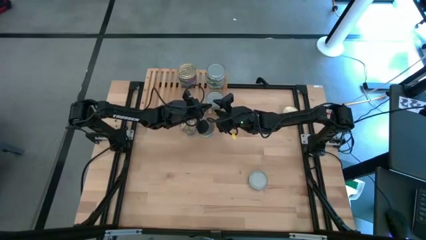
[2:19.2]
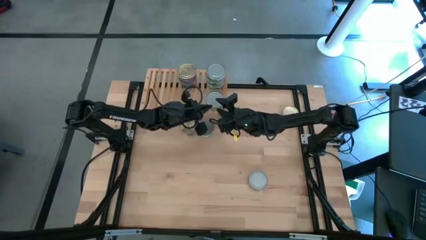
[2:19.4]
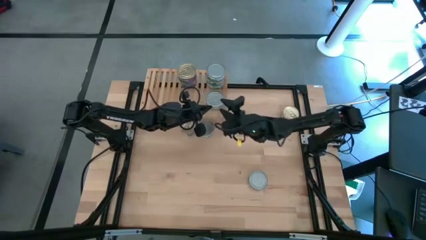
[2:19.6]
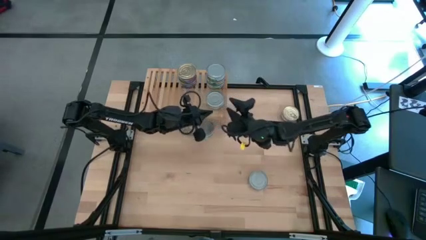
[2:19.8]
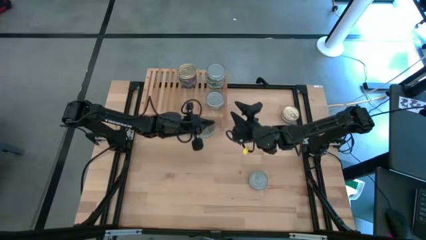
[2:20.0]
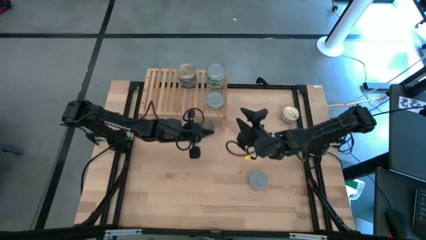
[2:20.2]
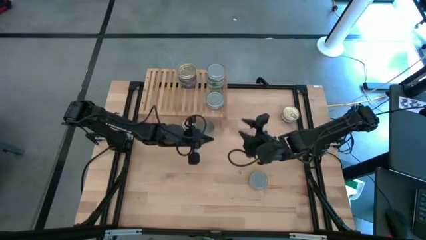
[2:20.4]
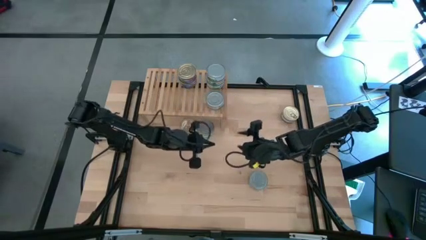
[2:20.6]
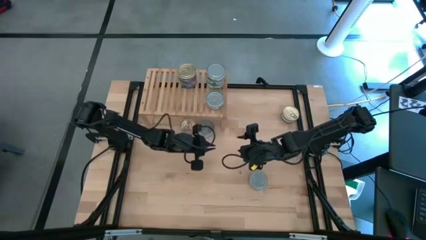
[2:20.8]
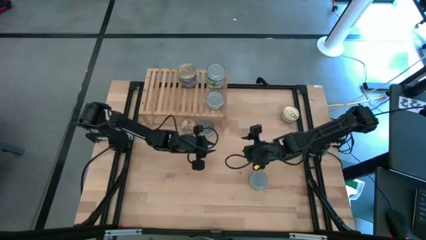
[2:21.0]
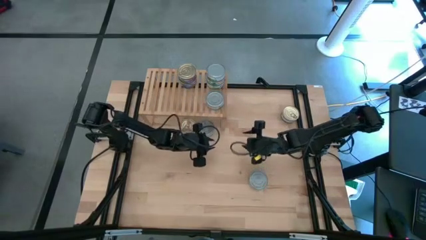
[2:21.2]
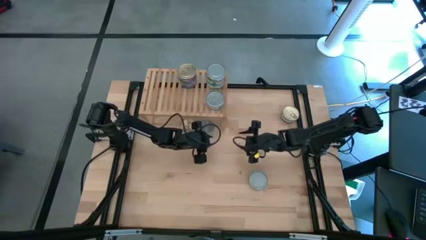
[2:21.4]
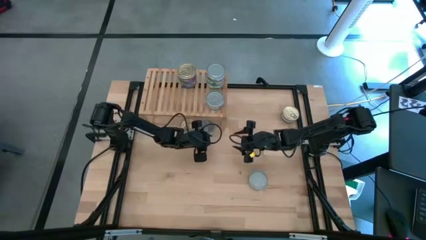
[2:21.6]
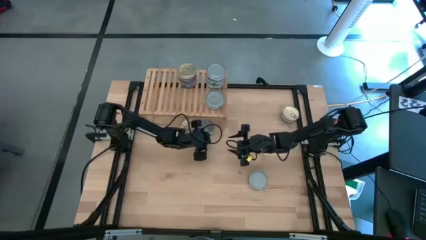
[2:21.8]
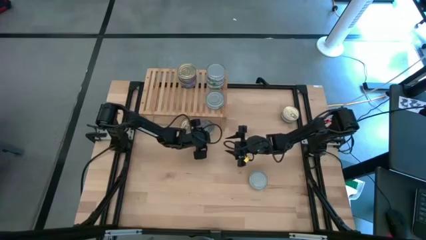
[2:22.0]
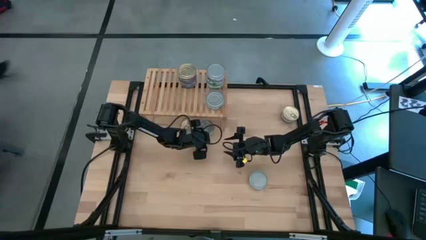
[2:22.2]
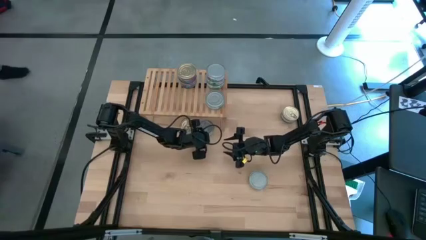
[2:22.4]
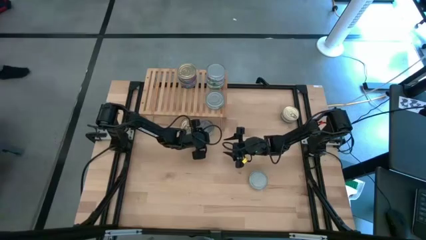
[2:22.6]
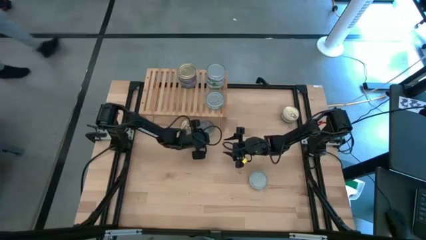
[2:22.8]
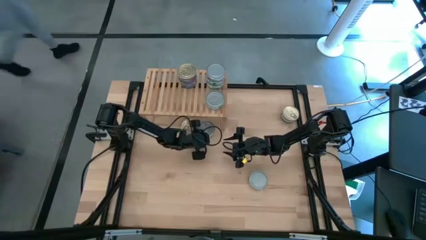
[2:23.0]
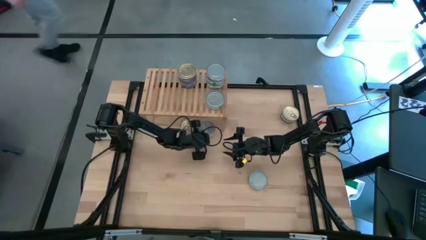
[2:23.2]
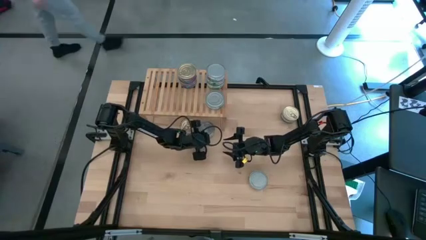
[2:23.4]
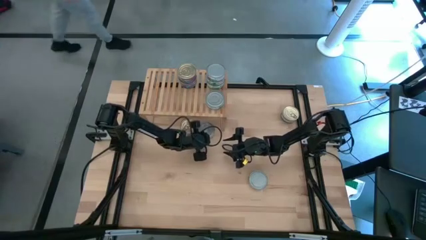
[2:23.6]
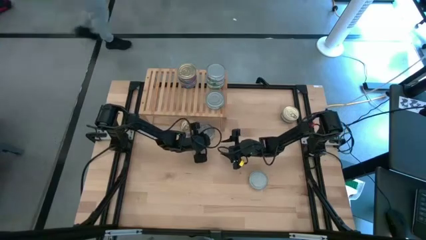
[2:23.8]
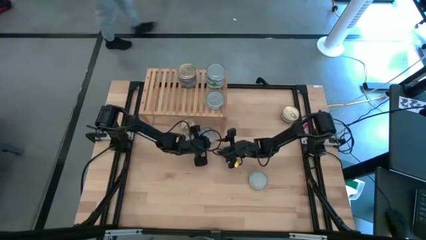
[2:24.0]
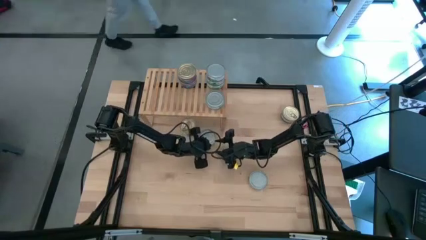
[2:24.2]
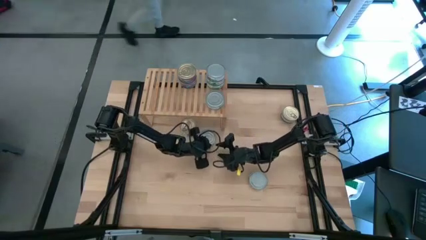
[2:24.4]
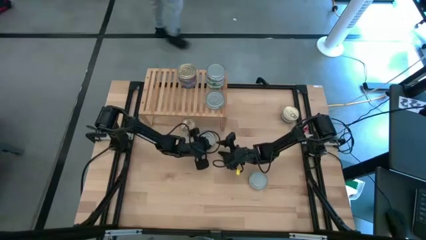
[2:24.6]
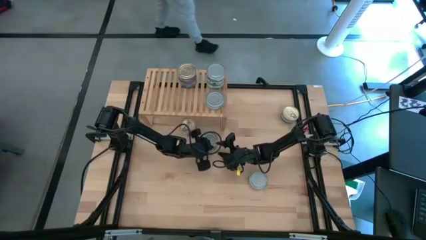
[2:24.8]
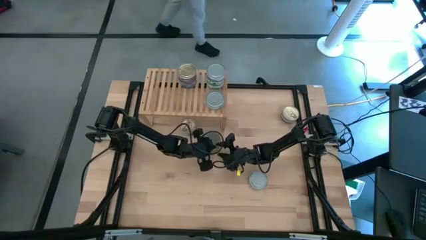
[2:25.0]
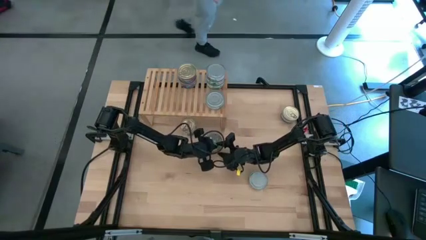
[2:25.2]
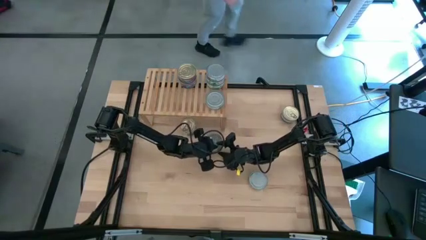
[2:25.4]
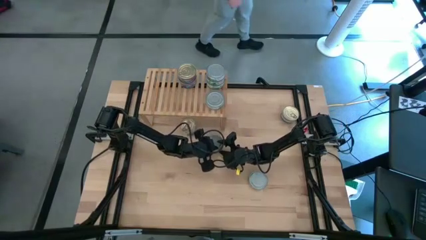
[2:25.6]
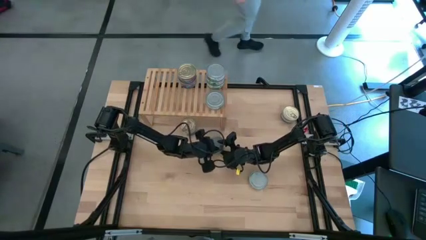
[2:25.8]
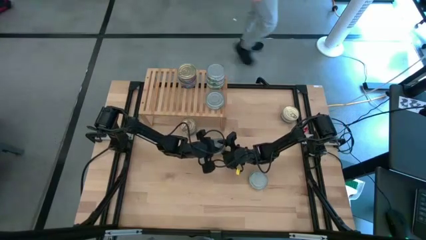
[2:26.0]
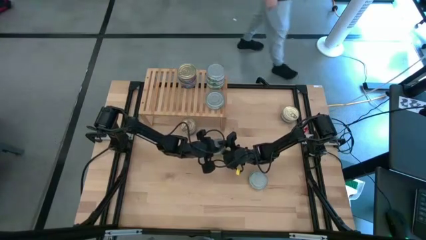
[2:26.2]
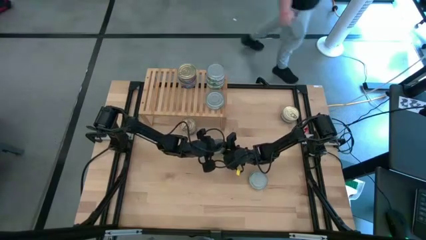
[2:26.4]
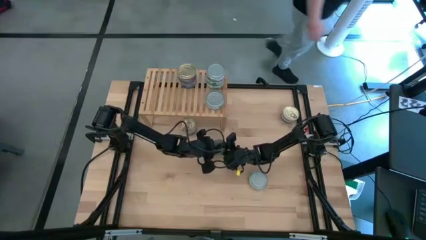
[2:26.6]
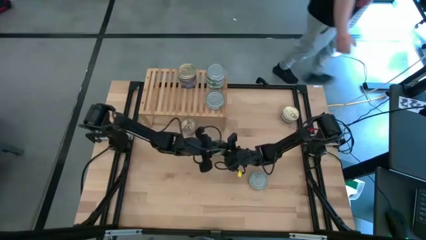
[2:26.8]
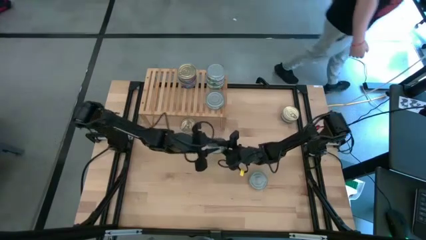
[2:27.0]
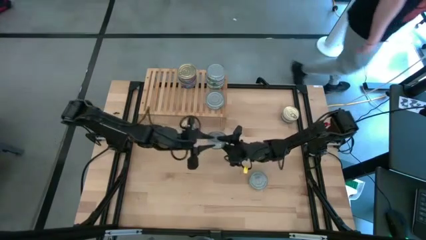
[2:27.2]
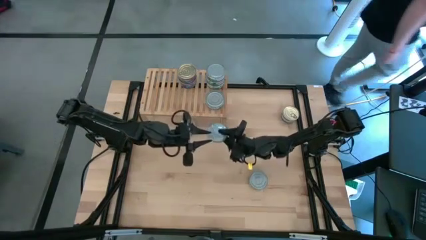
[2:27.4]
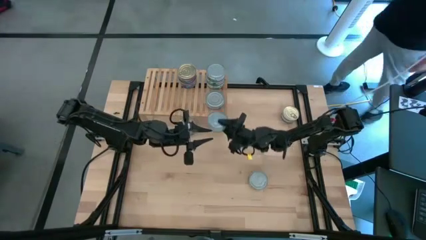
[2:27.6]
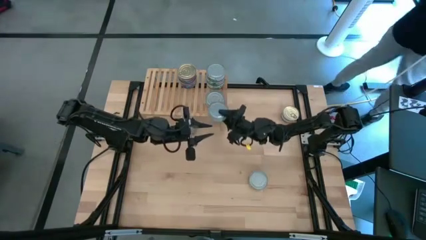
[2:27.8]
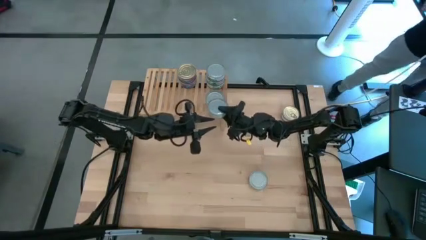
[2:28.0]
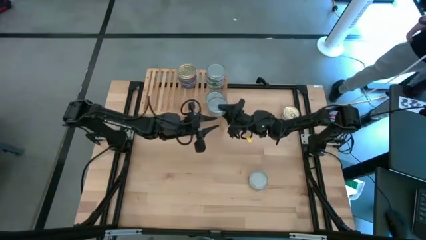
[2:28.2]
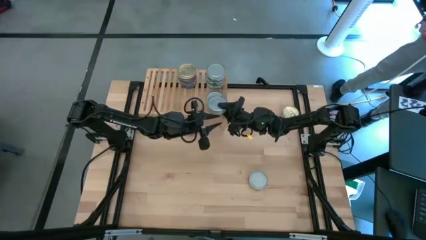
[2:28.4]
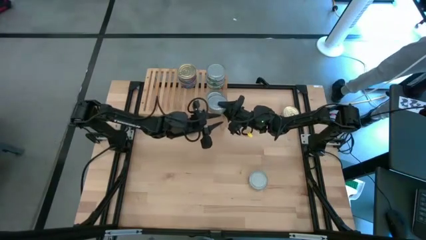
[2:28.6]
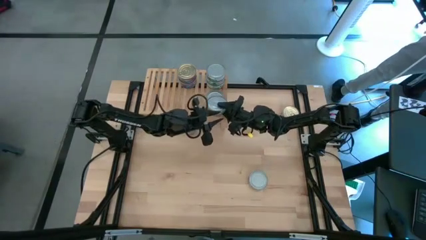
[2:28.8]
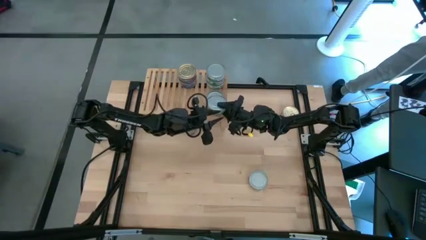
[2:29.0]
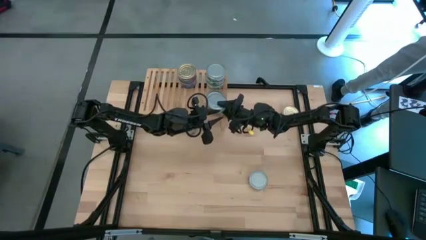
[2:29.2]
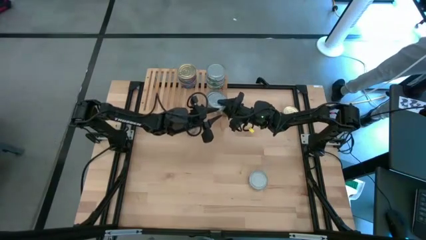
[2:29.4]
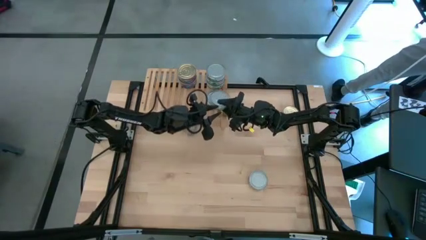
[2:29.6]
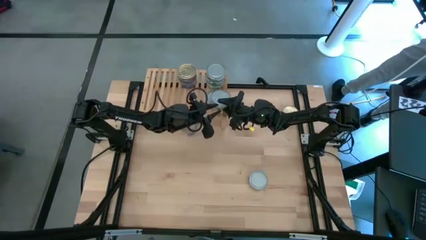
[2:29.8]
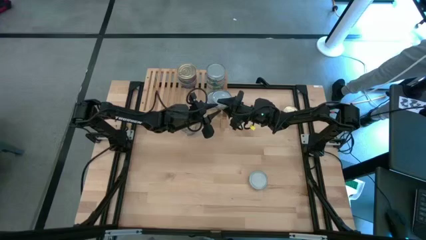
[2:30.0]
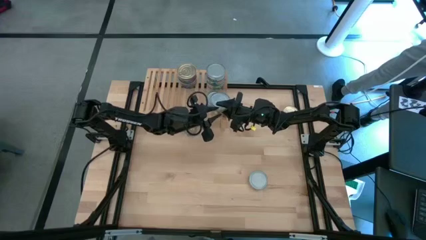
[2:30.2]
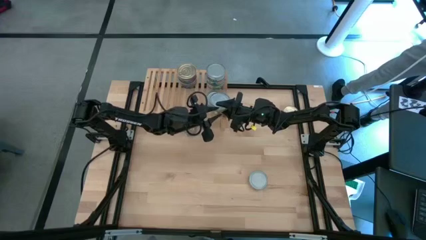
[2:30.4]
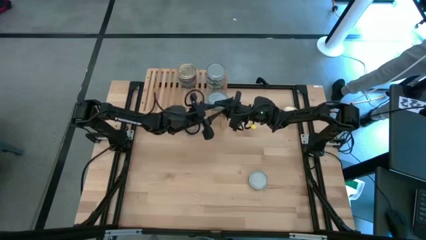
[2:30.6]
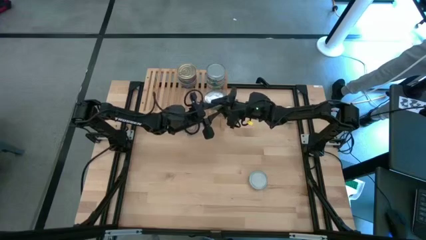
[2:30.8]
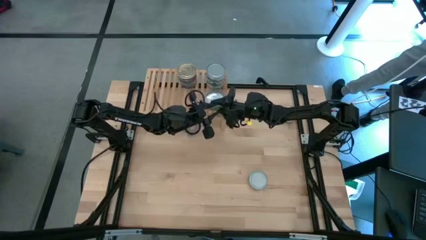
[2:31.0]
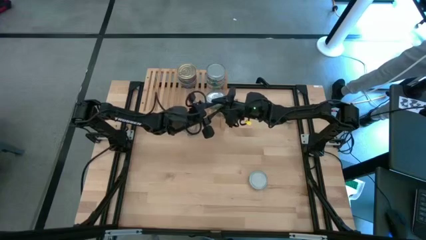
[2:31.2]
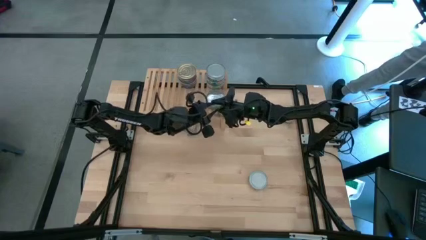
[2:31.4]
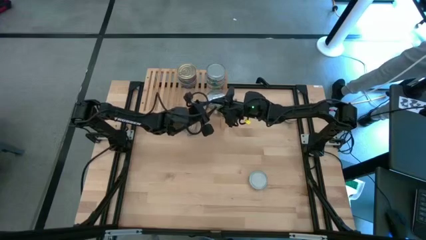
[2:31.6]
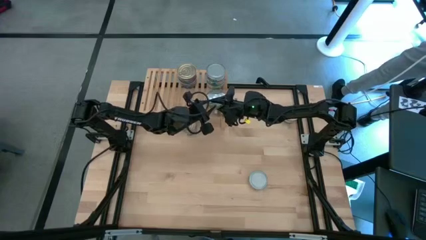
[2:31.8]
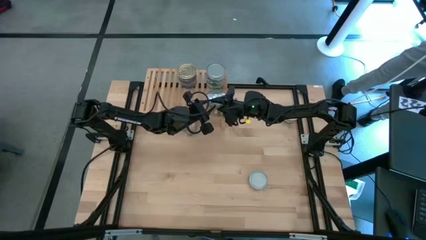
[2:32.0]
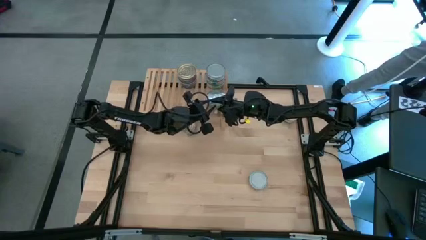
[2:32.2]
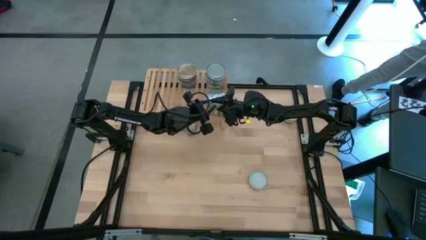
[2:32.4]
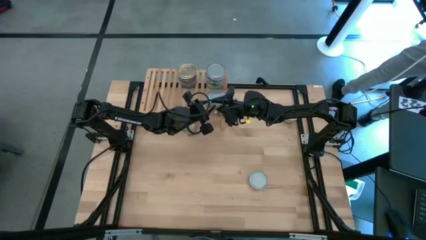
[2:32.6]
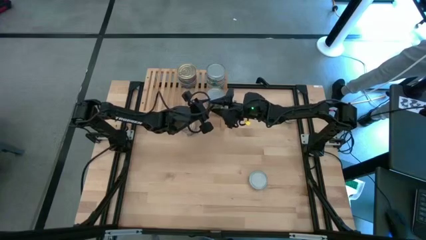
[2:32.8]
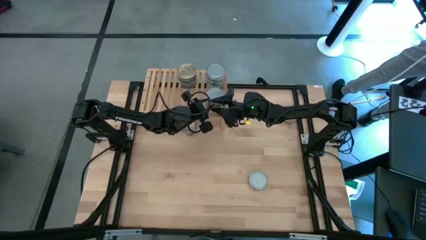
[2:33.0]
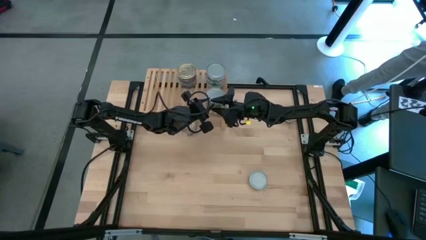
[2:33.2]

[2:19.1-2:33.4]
Task: Stack canned seafood by type on shelf
Stack the green tuna can on top of the bottom green tuna can on the shelf

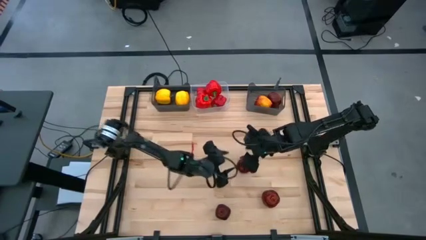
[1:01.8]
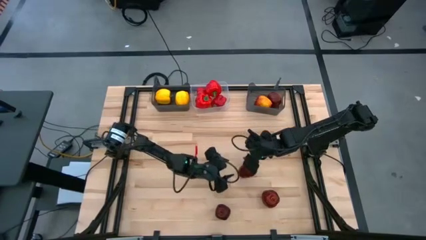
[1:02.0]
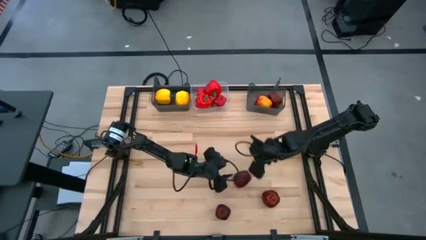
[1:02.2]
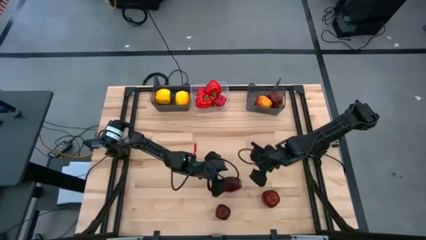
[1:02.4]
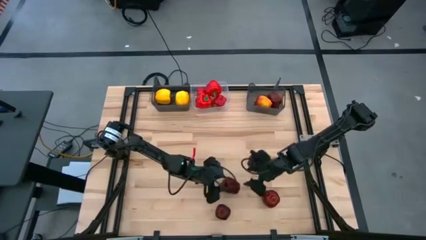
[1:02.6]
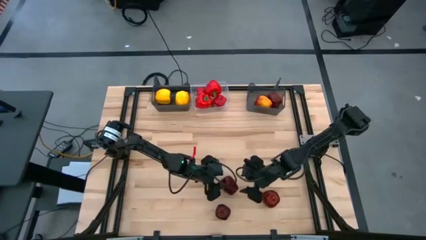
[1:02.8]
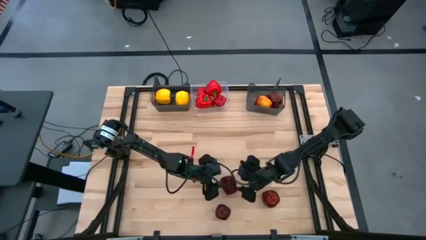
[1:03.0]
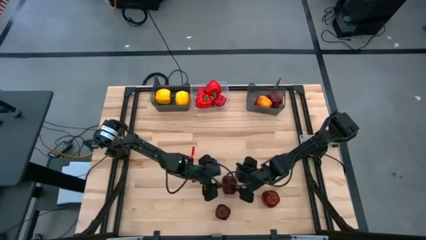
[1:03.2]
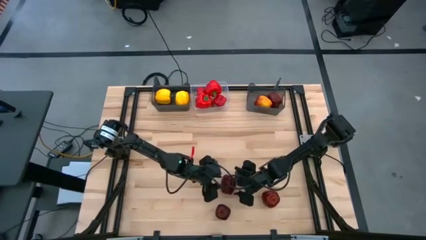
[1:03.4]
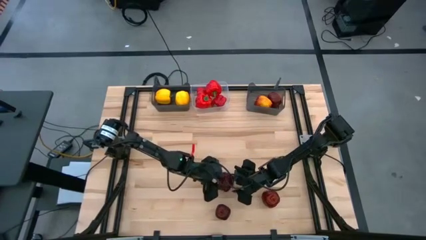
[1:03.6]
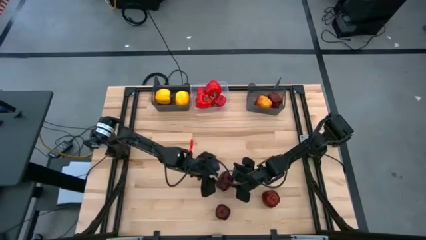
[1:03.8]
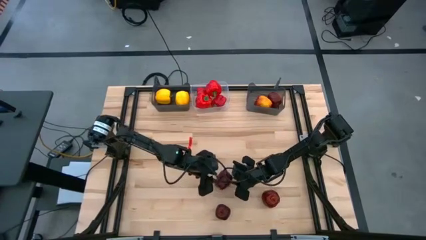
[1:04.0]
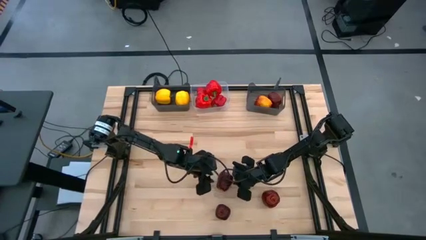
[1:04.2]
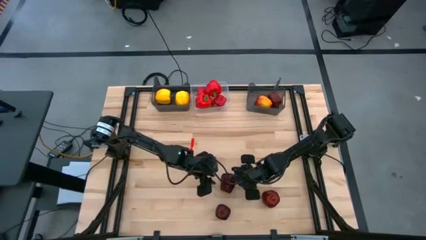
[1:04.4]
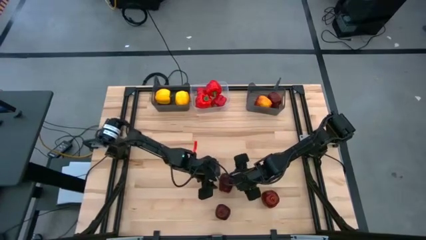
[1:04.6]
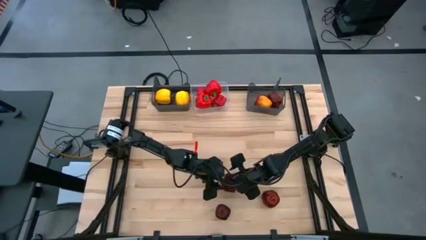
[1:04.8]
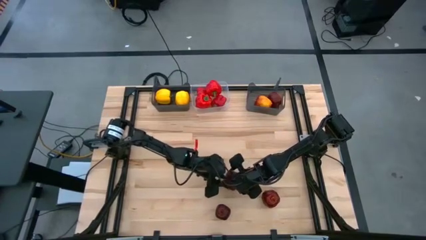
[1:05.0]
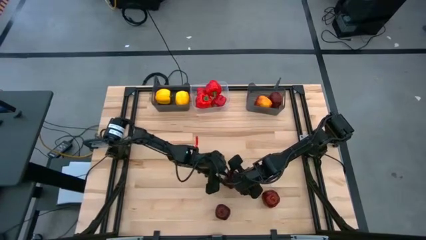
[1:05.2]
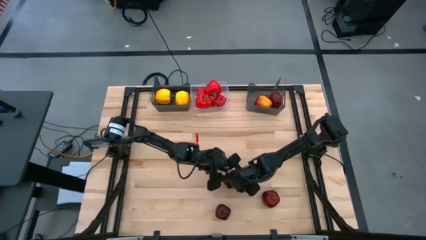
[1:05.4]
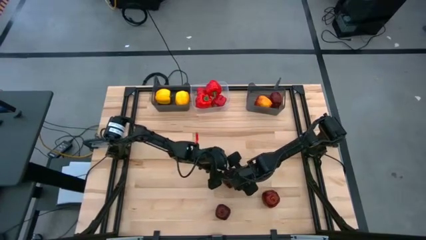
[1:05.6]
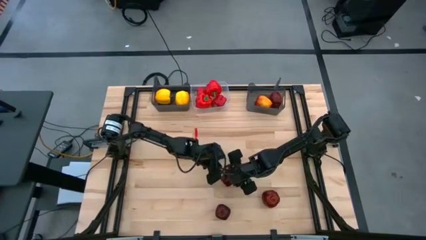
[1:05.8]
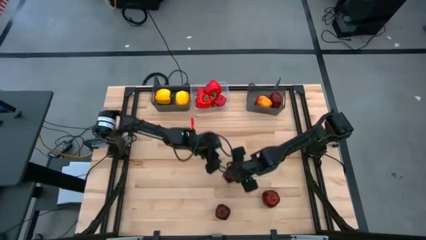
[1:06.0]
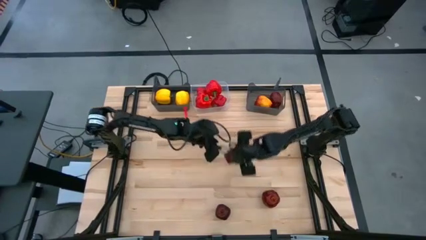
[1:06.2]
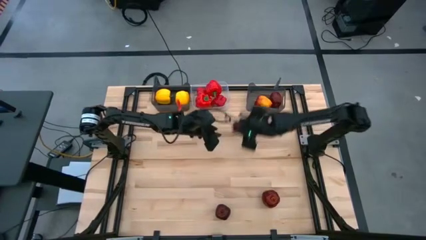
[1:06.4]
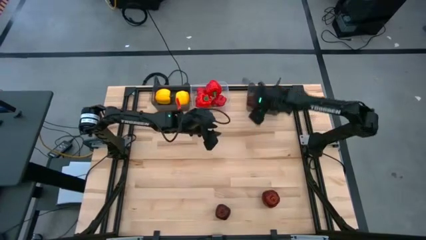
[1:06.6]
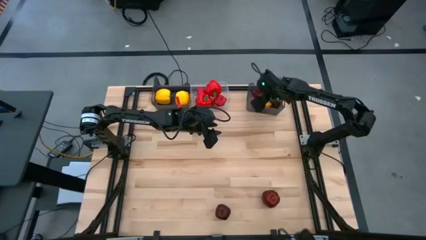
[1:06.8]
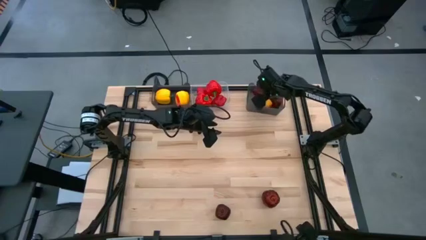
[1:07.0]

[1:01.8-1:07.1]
Task: Sort produce into baskets
Put the left red apple into the right black bin
